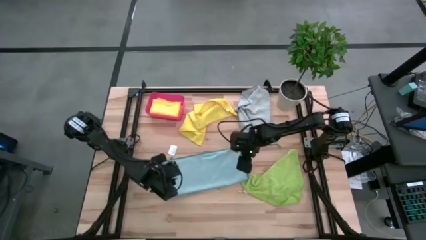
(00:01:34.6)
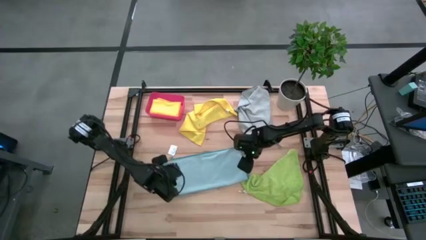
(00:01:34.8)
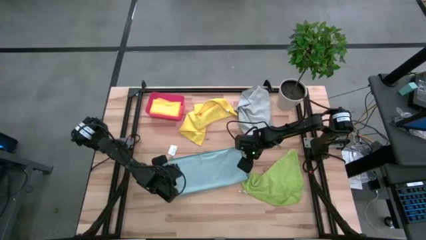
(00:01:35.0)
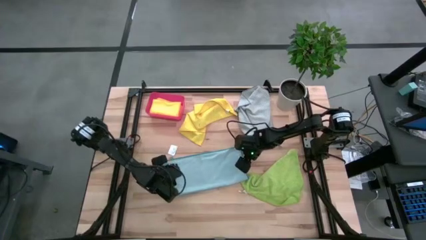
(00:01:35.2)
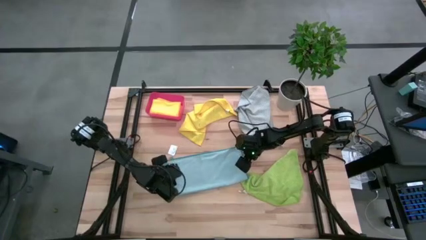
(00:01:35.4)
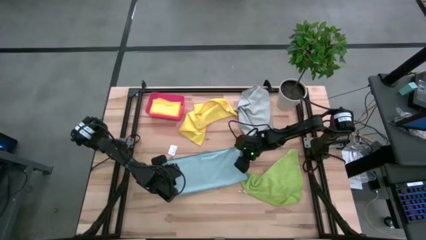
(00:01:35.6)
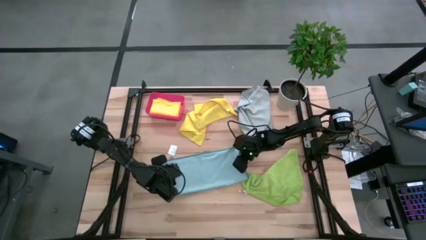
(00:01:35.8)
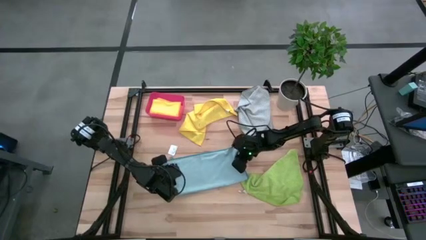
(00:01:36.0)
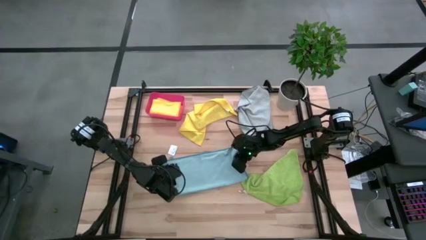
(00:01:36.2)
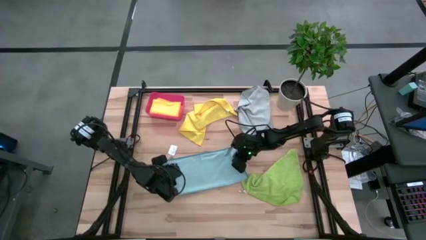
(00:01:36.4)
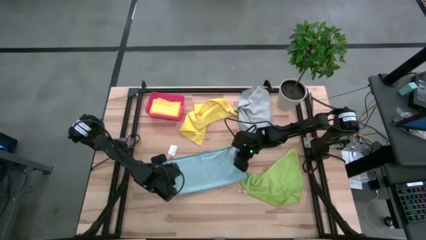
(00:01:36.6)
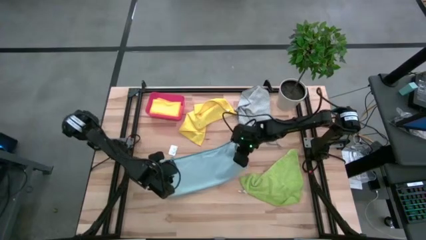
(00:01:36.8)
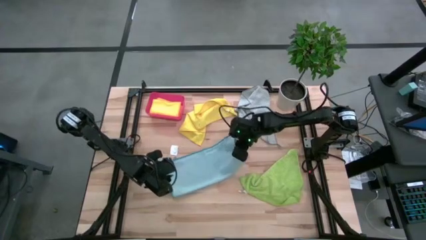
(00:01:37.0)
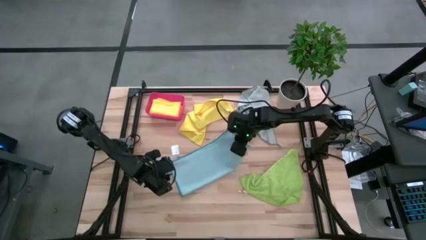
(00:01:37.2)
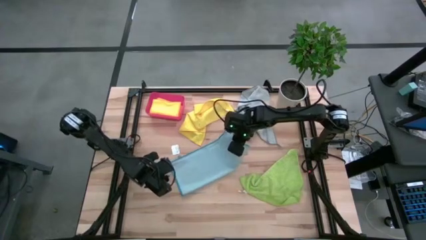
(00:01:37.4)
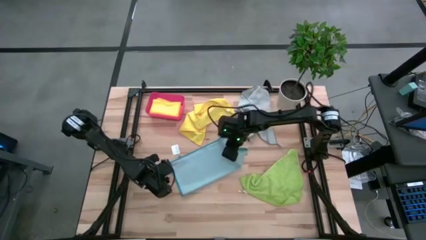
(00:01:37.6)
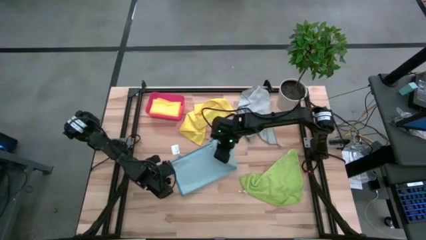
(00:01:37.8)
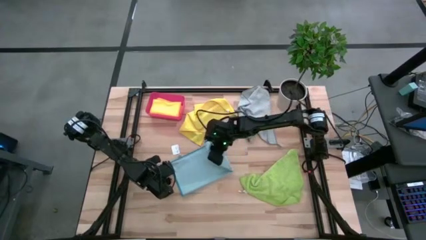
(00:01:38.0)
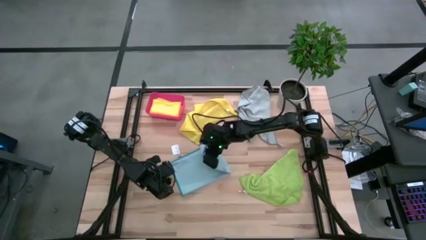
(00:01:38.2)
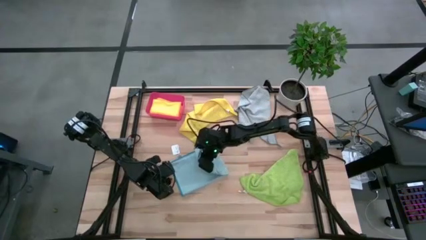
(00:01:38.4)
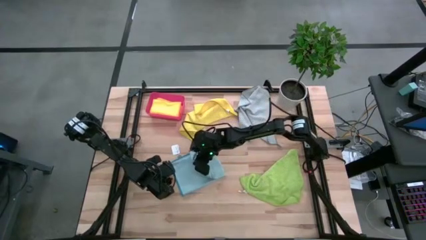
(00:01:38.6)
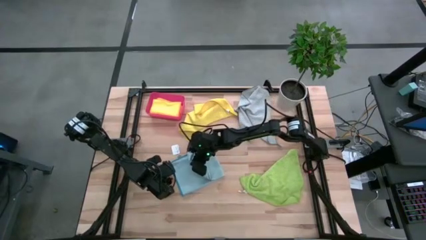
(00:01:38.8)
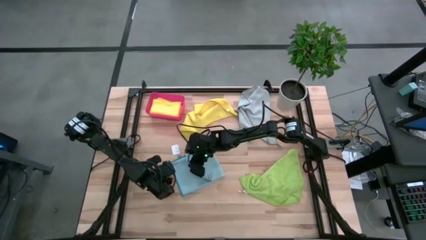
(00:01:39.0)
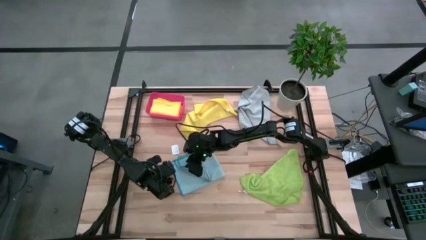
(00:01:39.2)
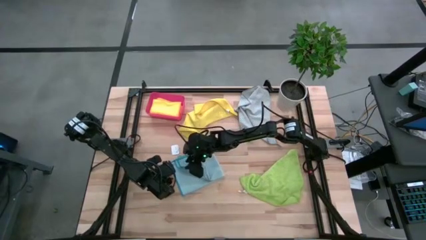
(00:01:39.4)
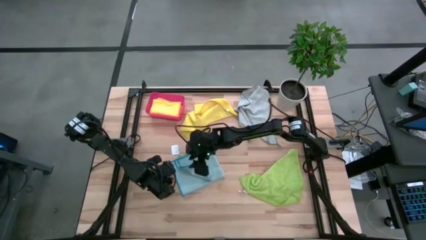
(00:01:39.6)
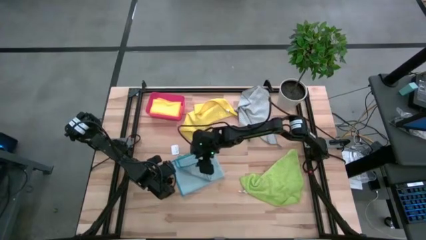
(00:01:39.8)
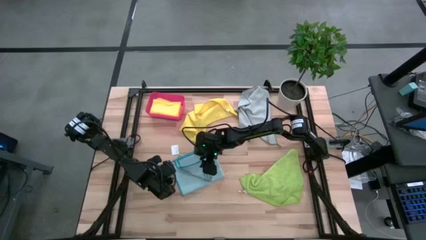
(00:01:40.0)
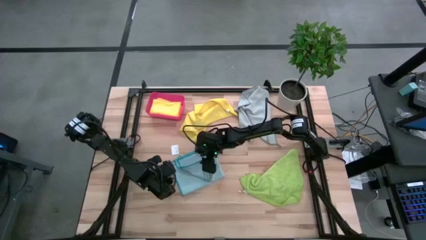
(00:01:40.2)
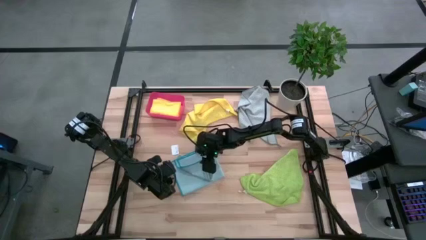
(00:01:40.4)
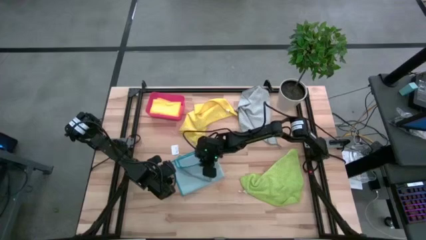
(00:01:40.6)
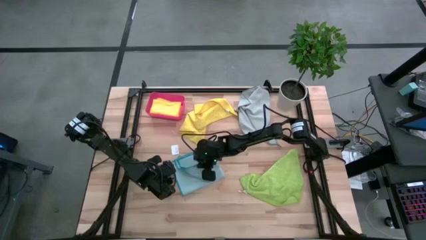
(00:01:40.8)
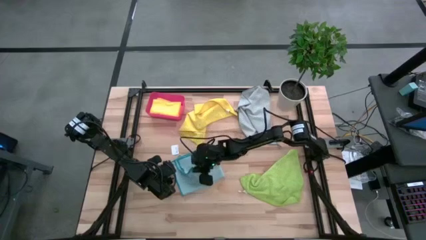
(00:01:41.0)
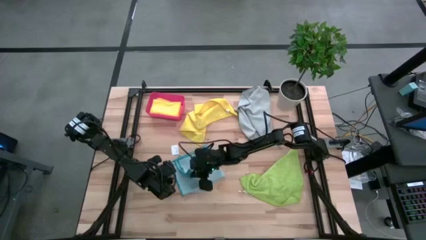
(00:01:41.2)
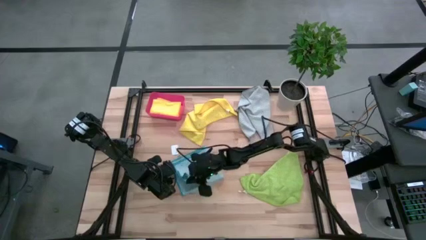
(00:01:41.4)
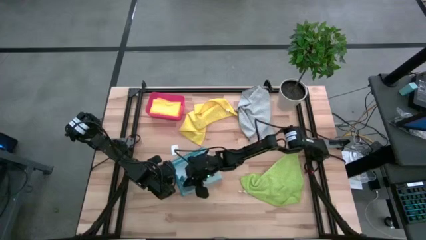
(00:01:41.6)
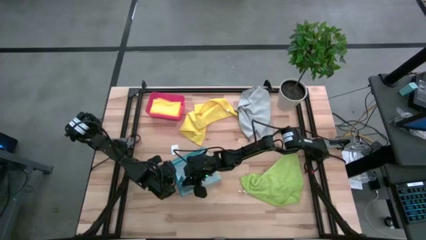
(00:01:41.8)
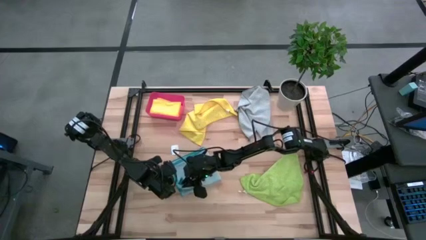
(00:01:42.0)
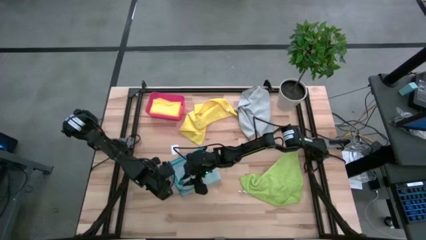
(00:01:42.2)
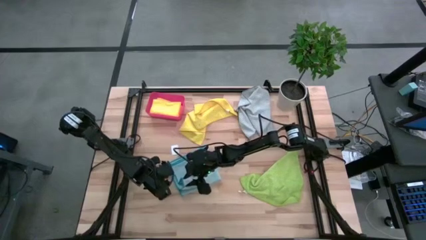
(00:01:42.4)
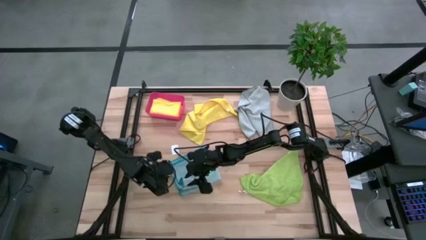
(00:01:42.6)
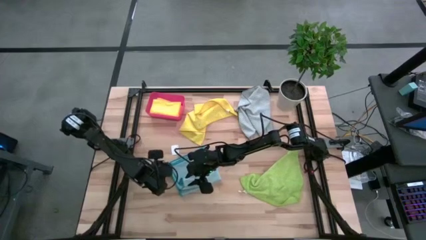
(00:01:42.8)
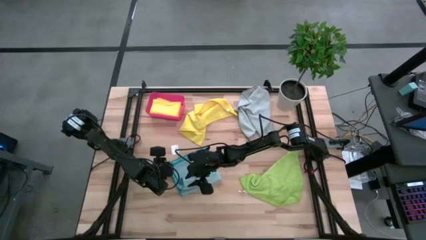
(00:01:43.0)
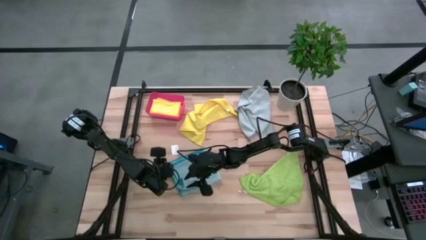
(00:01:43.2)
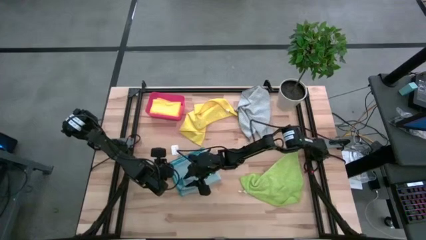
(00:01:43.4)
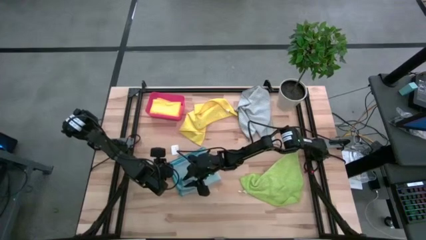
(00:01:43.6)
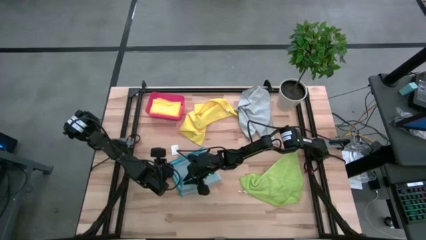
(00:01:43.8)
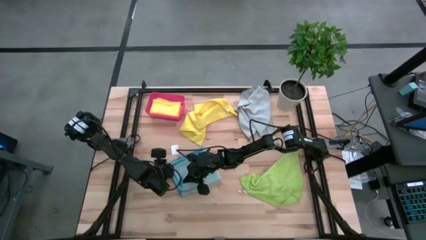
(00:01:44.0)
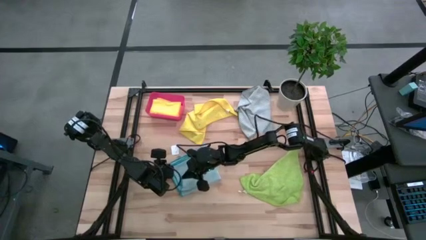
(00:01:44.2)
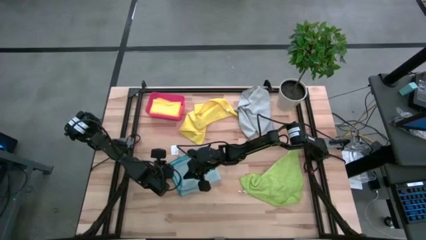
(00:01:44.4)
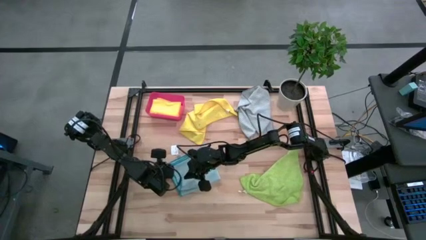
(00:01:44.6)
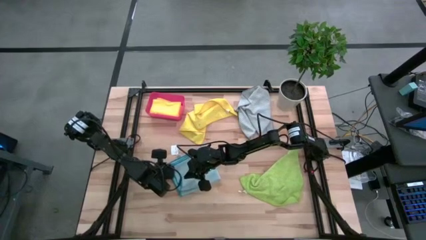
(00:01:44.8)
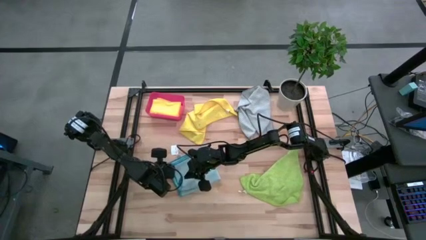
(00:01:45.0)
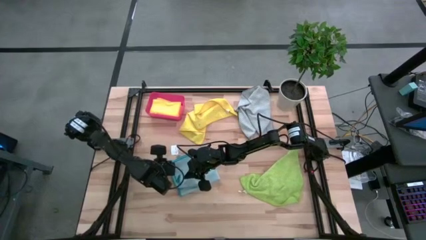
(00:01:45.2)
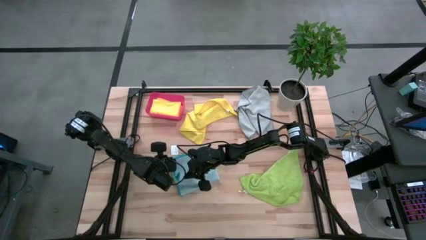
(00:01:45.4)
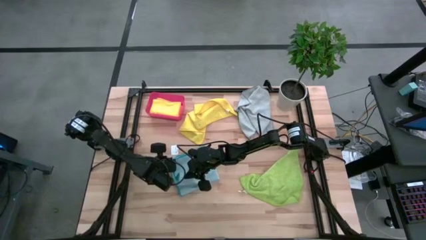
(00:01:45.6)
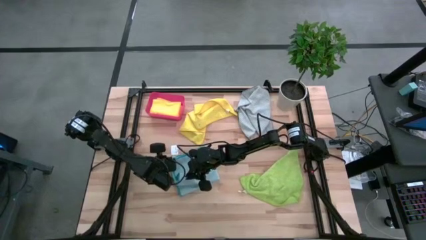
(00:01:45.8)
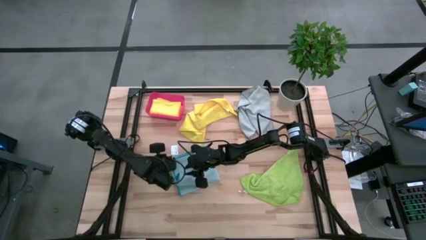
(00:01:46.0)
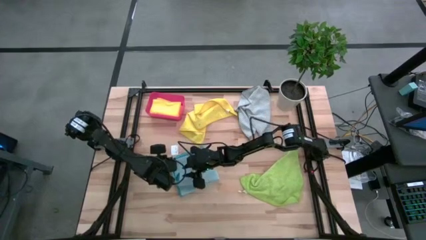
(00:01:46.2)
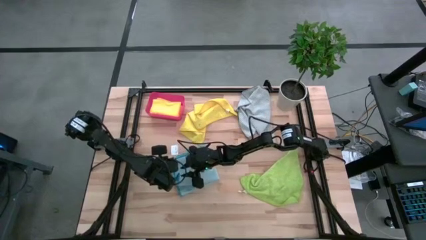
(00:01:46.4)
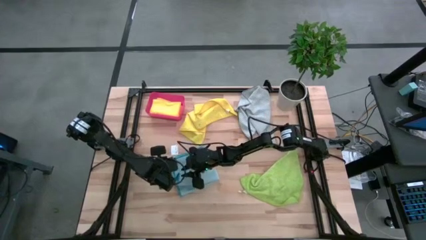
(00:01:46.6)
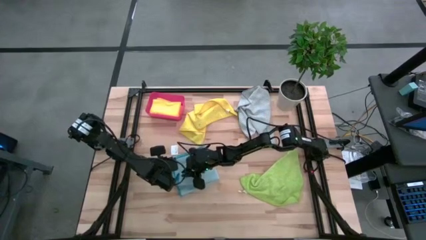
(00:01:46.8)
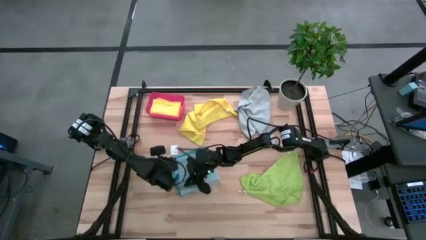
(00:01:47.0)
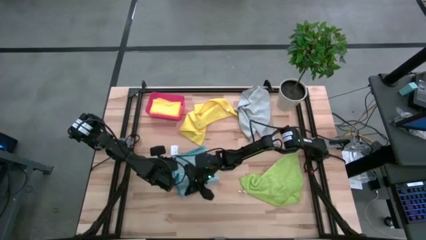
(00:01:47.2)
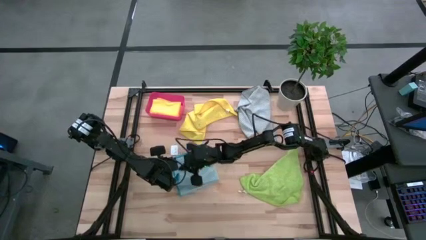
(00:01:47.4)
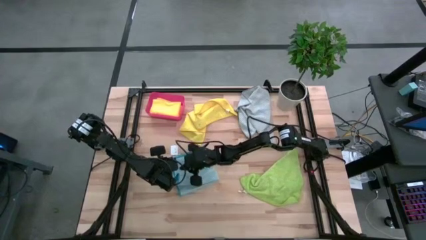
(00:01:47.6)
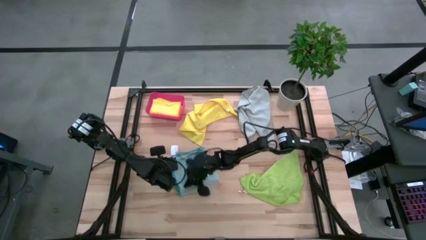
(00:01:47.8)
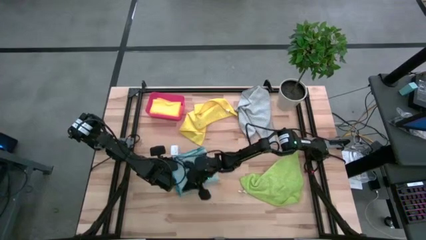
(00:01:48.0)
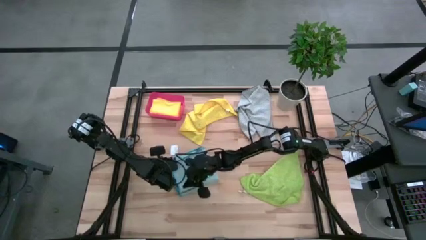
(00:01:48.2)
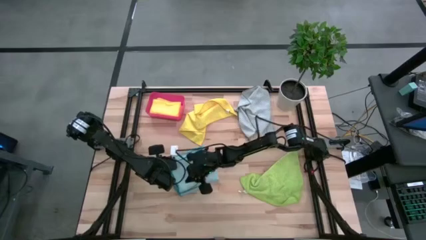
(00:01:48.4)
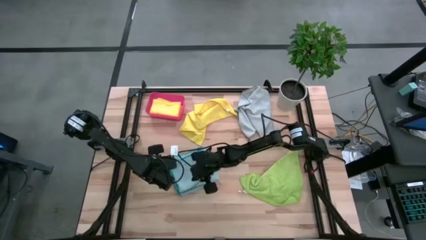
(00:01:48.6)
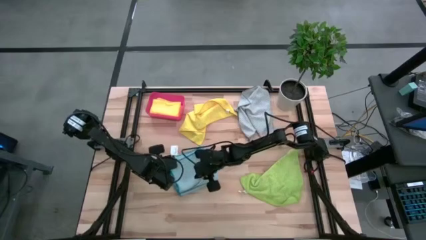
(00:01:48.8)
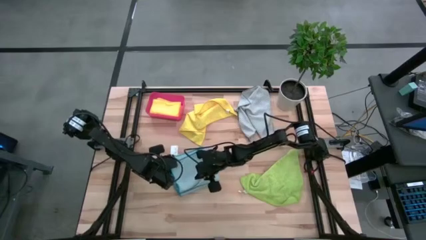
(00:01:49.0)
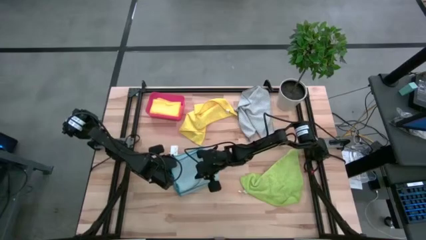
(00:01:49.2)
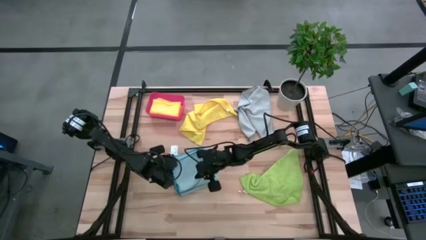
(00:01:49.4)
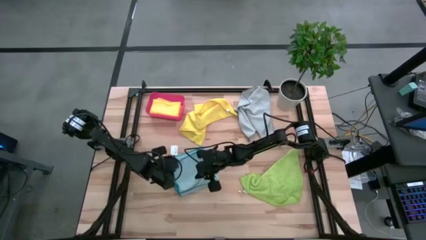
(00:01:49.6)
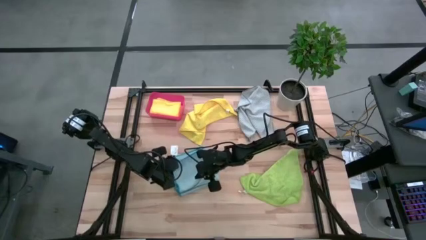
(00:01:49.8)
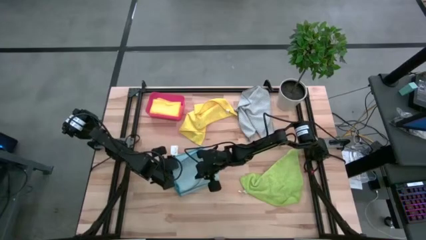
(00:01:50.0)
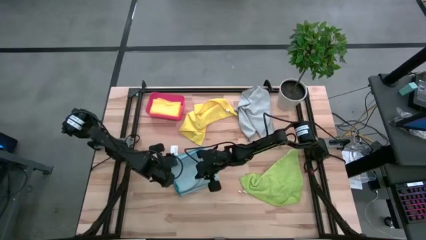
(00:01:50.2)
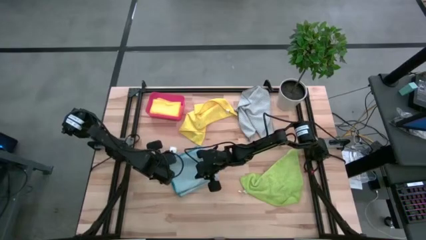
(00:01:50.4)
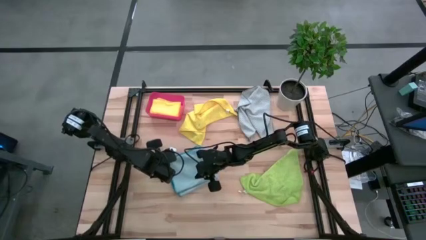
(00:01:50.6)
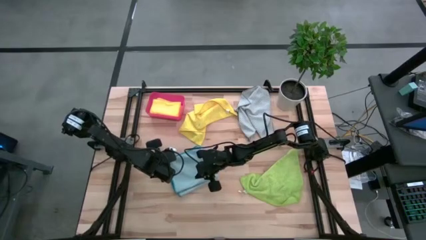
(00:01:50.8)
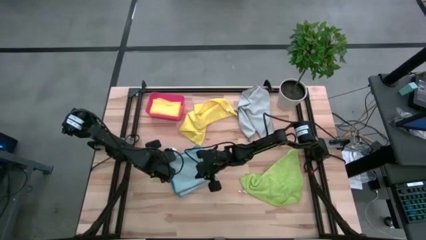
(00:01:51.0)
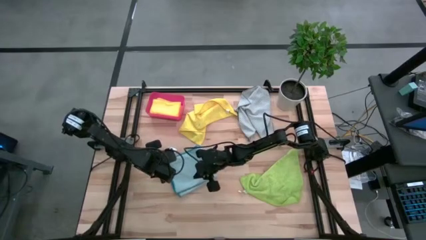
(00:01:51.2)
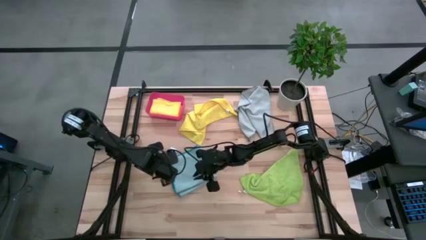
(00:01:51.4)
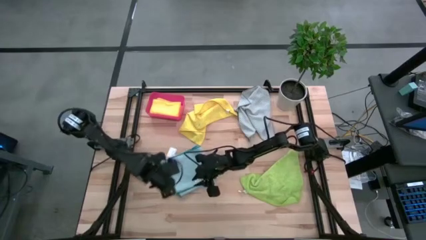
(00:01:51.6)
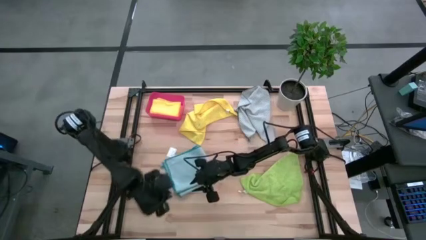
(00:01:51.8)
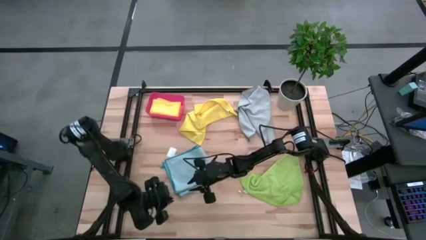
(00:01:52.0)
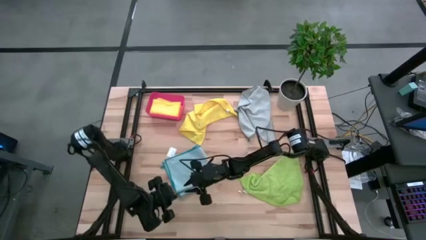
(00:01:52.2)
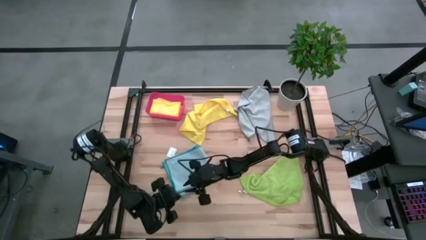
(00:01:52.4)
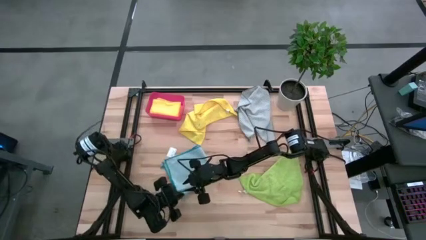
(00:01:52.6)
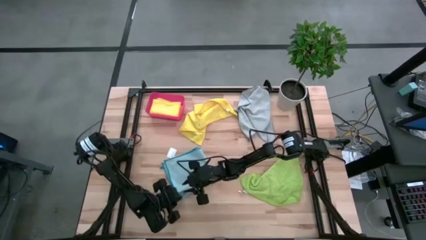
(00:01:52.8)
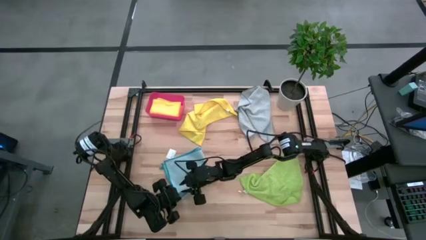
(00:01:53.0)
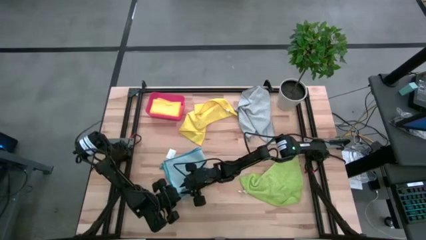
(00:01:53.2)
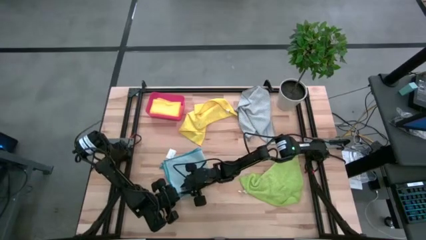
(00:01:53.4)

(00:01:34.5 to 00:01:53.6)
Task: Fold microfiber towels
Fold the light blue microfiber cloth
